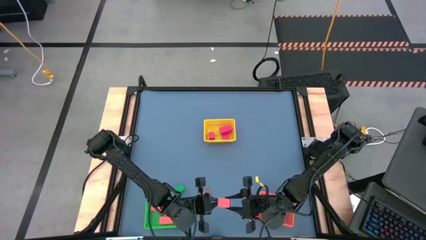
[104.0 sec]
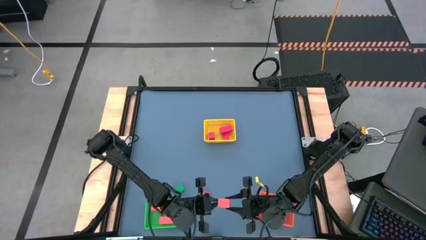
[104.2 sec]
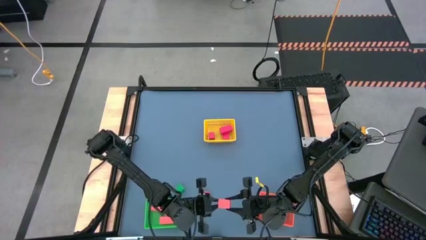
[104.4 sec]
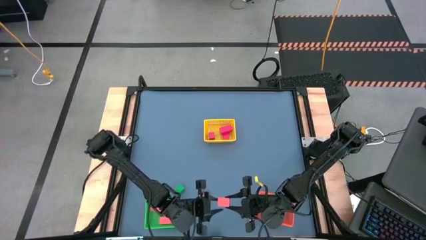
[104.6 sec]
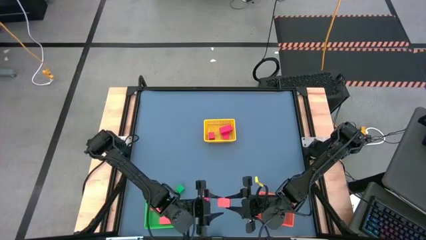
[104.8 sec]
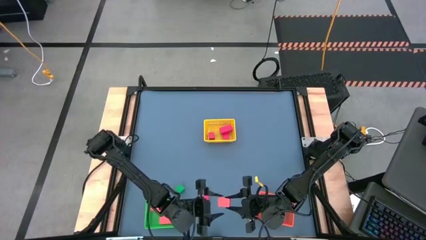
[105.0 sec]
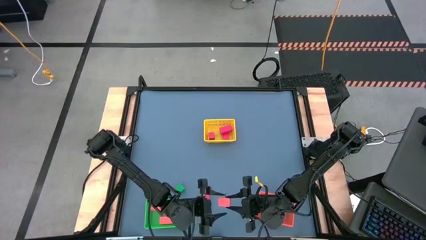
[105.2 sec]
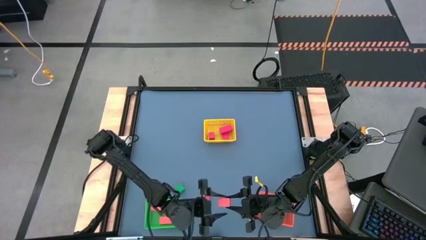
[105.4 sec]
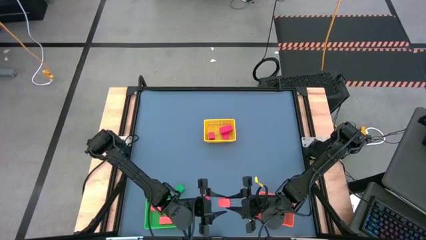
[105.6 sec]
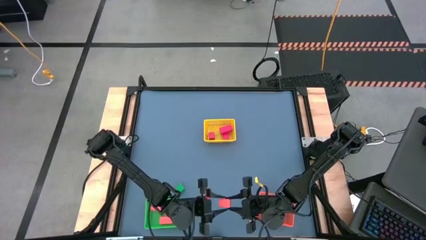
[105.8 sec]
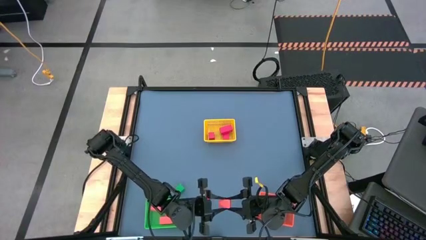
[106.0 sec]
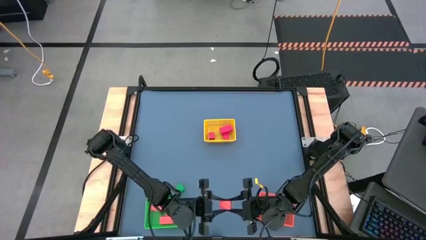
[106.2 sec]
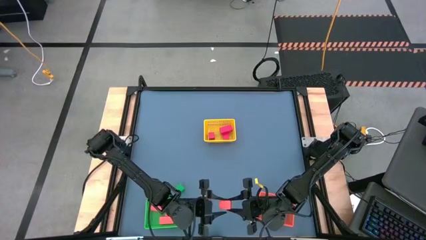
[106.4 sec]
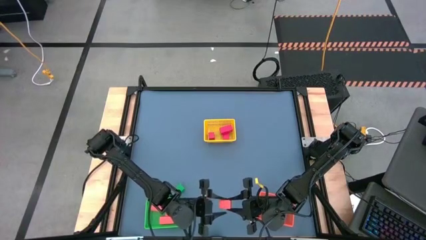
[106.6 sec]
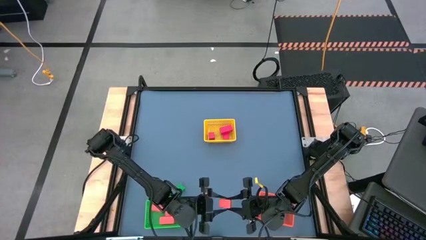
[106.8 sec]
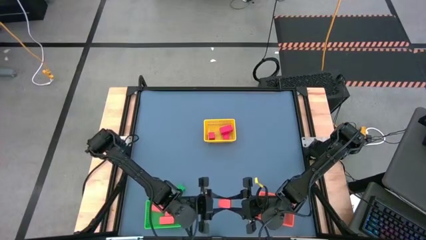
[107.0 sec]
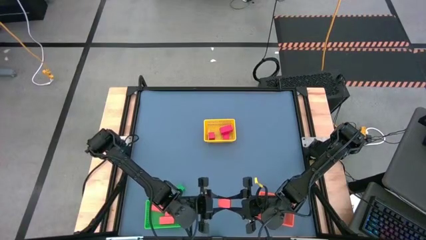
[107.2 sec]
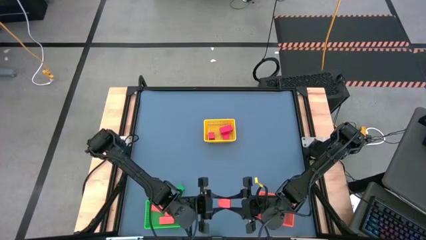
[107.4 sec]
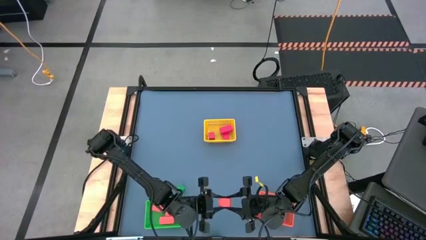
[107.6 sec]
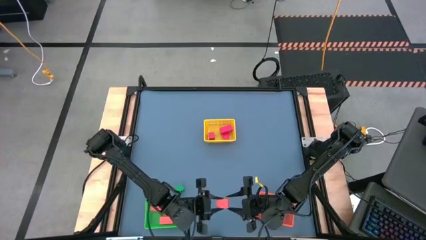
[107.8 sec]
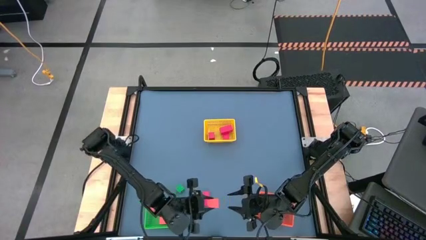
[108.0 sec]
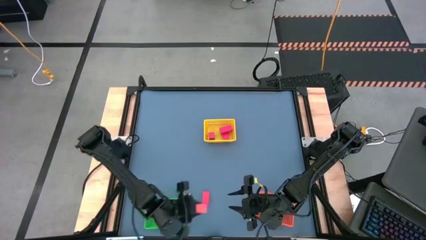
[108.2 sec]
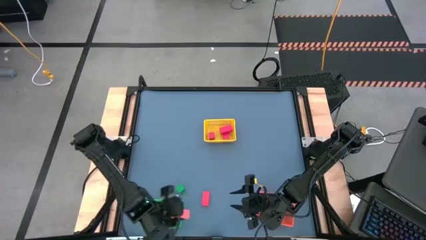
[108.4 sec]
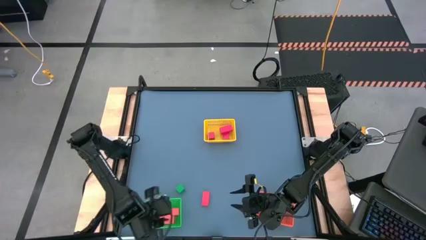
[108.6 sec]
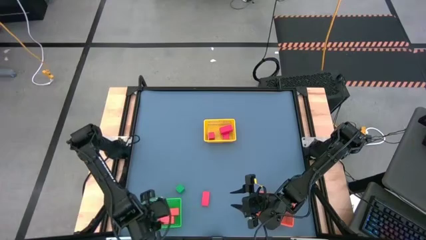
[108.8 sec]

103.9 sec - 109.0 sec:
Task: Sort & place blocks by color
Put the orange block into the green bin

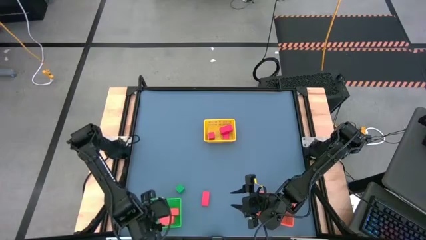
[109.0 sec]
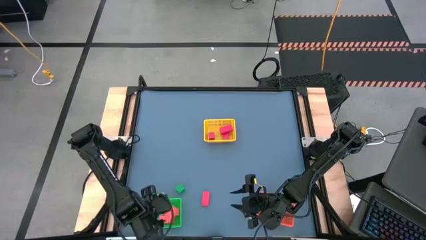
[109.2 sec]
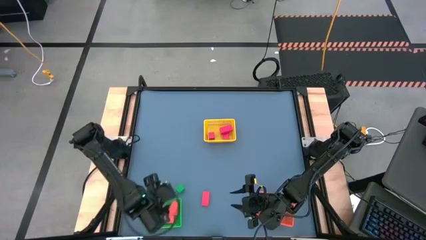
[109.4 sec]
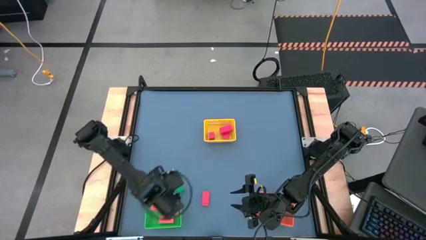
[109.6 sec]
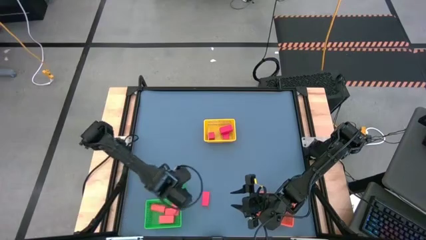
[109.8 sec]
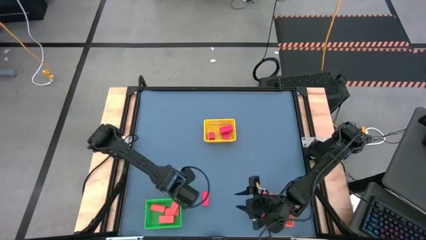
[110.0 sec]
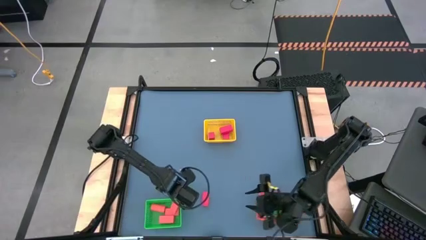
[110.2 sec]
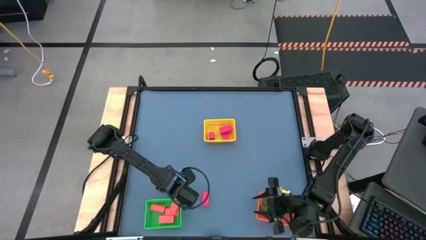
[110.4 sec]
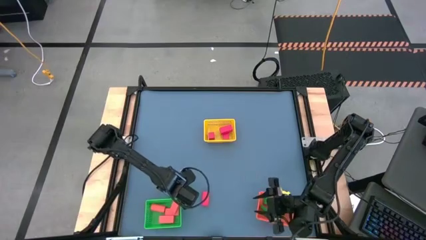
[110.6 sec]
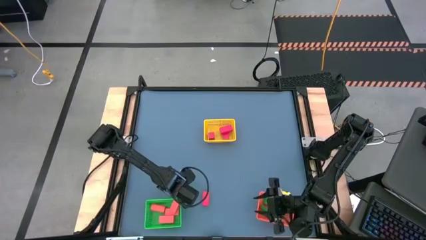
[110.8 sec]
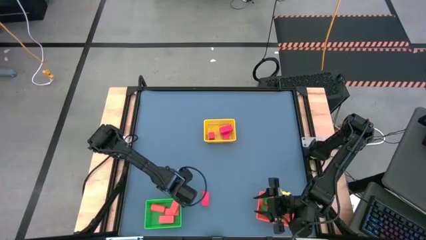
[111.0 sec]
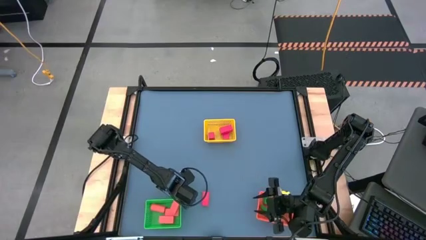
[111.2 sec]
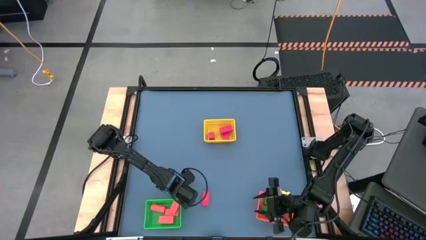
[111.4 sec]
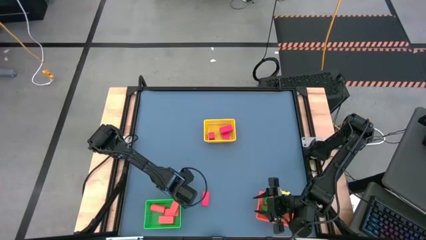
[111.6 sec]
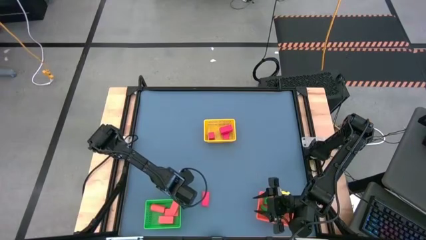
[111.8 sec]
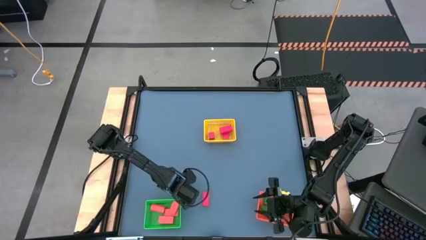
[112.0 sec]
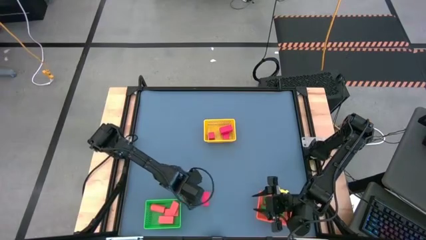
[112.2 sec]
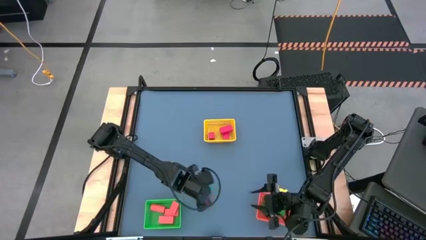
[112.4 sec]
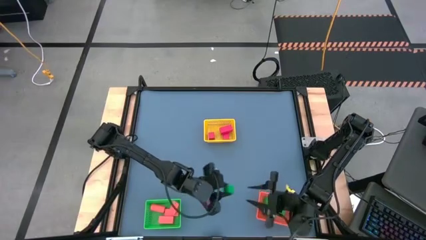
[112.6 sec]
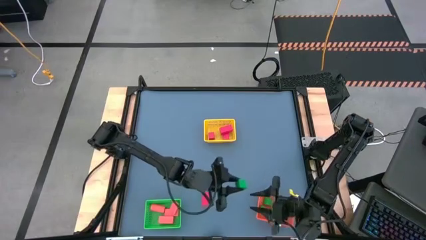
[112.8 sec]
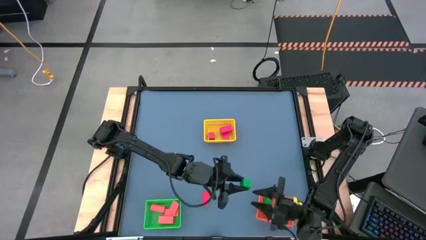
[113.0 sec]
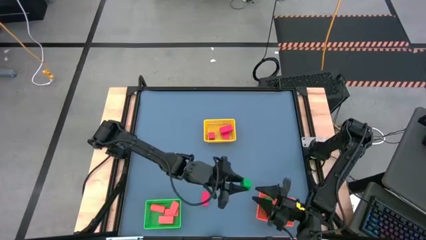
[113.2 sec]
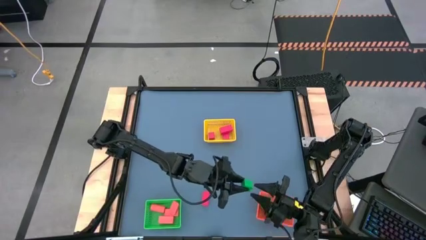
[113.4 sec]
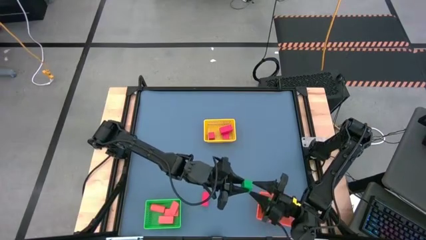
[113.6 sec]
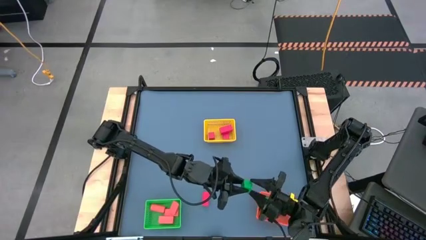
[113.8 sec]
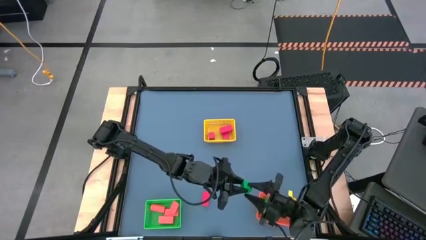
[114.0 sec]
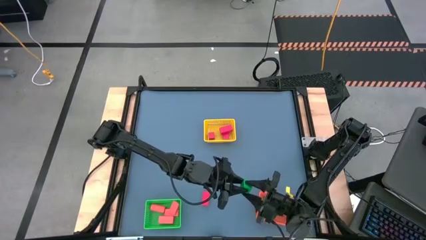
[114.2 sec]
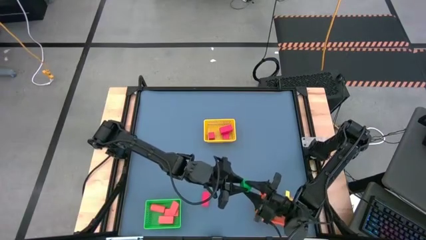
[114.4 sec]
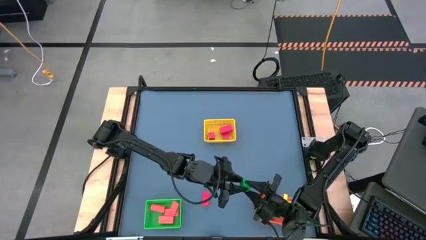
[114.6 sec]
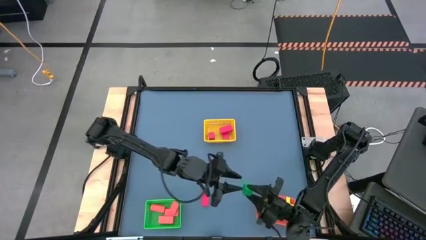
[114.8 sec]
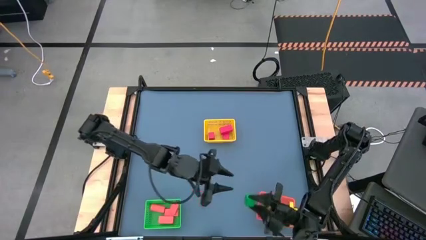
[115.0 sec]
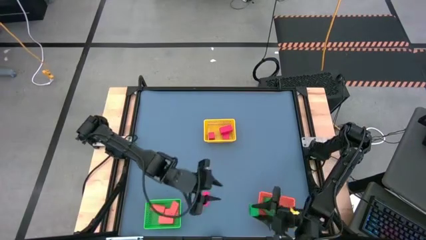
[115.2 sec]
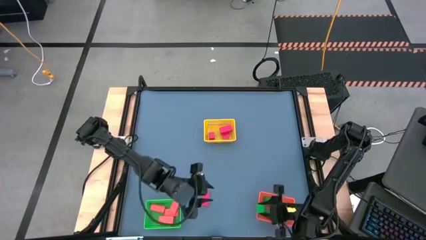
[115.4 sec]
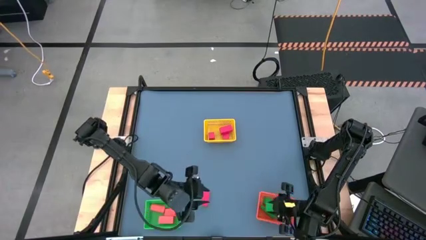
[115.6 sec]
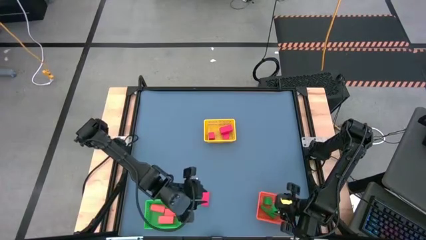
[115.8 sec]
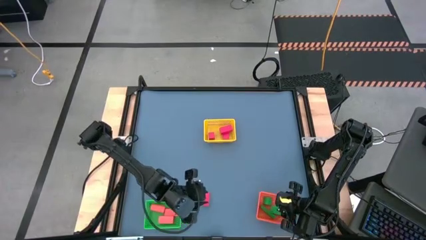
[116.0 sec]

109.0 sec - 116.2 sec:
Put the green block into the orange bin

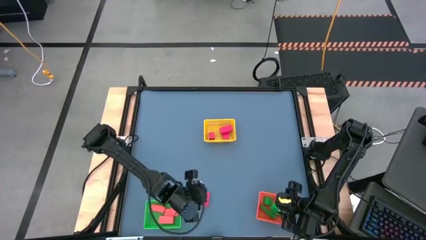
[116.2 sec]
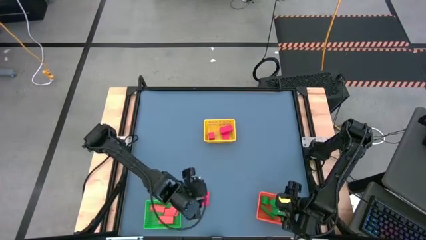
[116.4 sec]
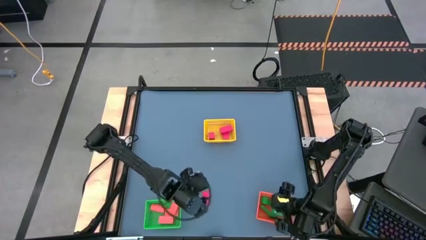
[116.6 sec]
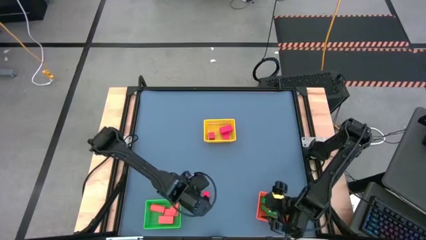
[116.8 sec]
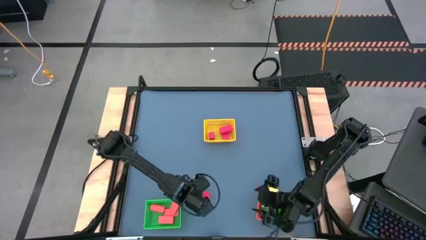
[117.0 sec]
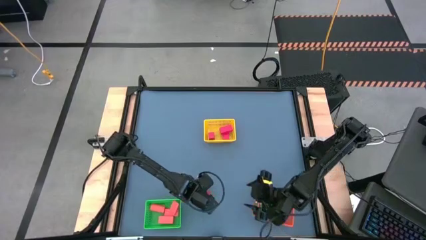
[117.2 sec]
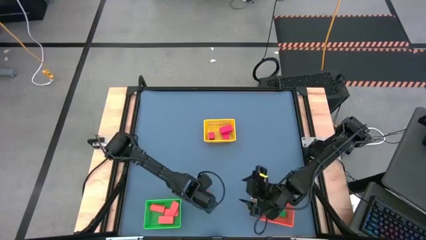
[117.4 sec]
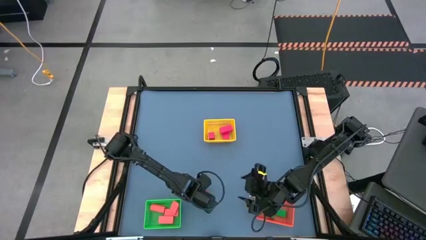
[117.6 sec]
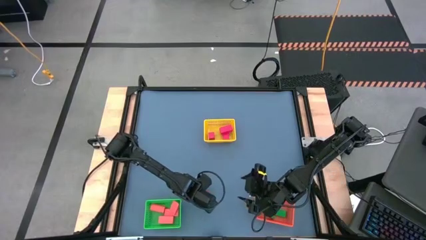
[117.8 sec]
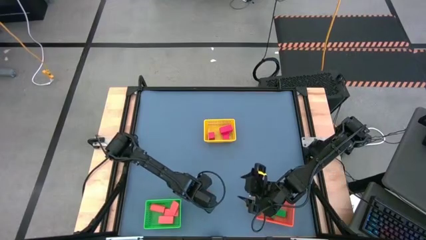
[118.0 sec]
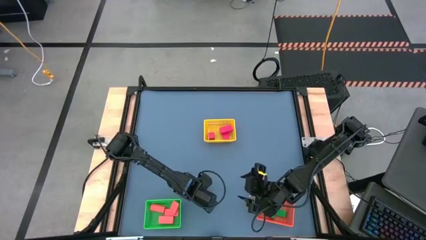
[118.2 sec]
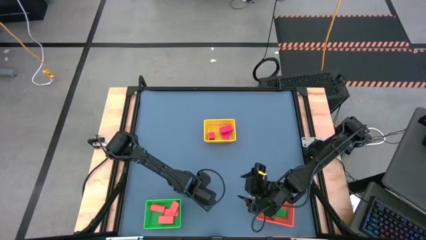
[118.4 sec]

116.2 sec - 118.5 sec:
Put the red block into the yellow bin

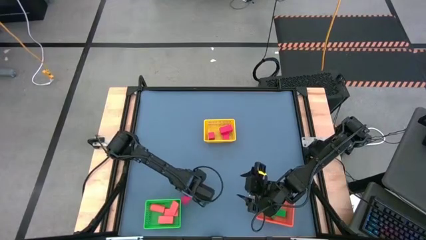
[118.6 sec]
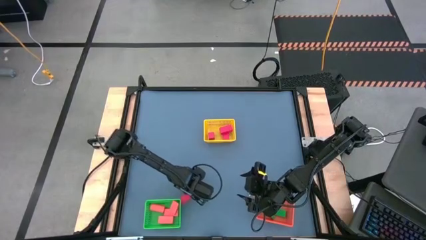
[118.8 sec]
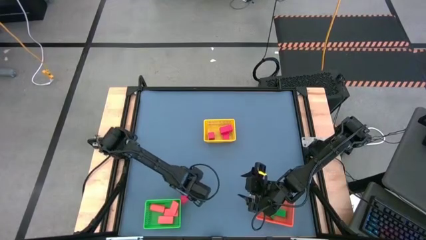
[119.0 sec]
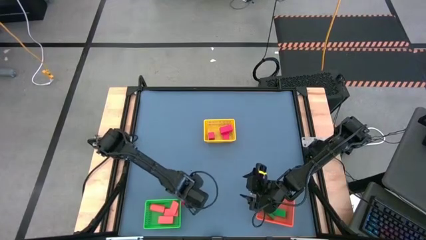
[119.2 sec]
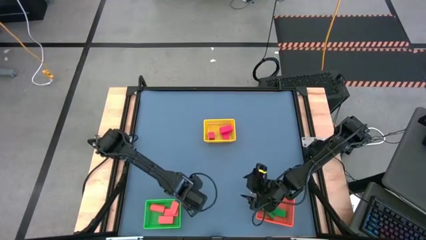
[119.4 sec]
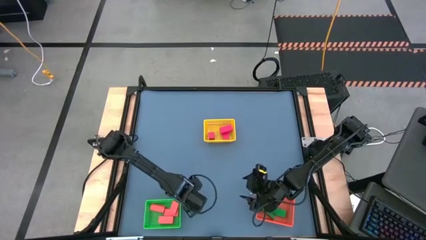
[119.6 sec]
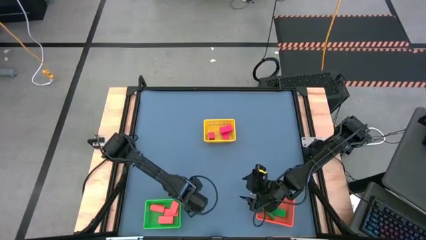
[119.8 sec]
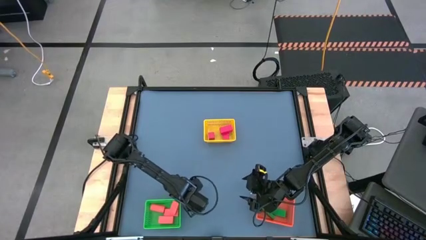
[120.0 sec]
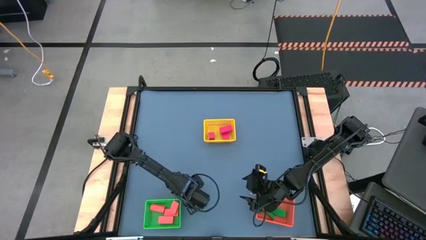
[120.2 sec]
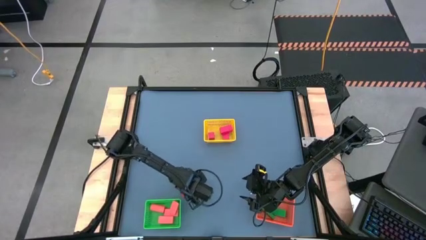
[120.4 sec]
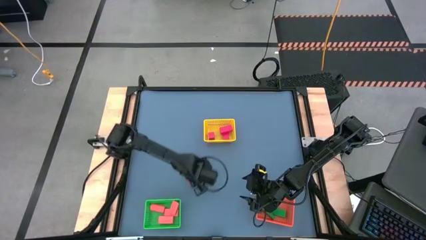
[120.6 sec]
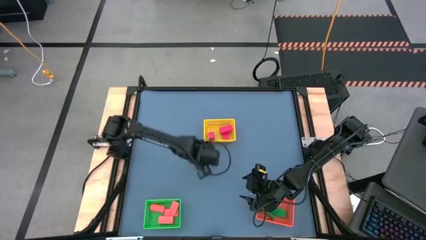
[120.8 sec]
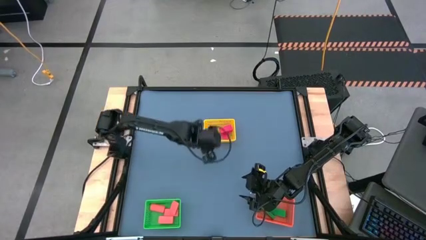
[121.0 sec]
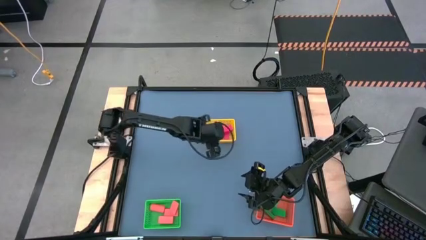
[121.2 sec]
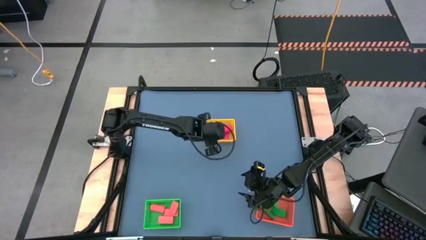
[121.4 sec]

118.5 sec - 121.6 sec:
Put the red block into the yellow bin
